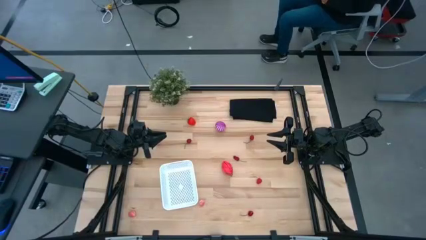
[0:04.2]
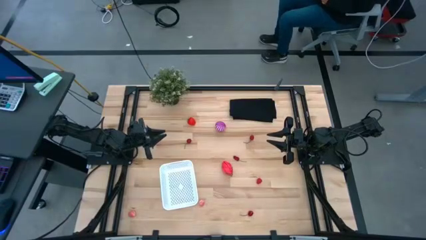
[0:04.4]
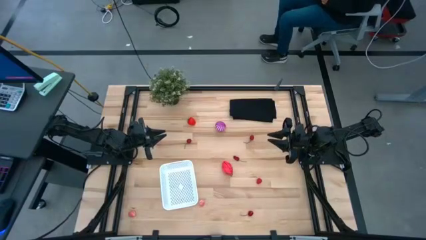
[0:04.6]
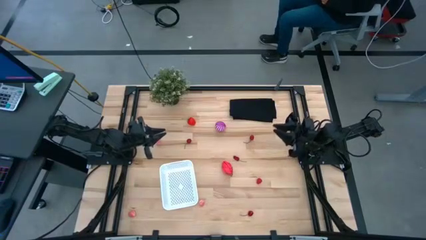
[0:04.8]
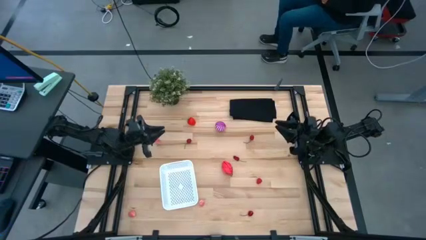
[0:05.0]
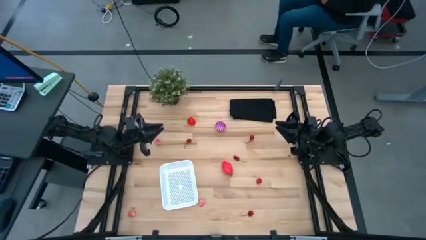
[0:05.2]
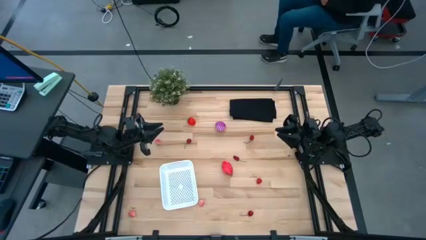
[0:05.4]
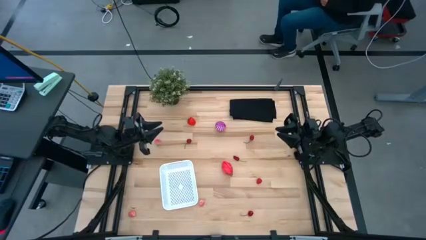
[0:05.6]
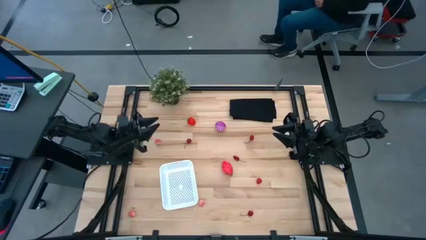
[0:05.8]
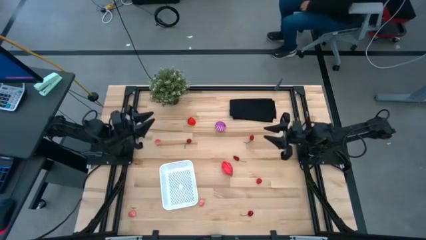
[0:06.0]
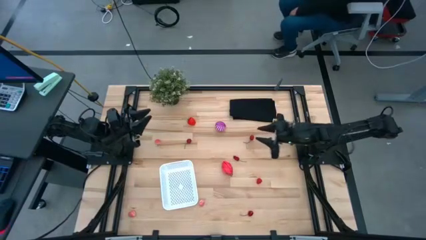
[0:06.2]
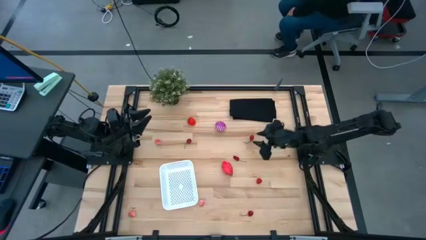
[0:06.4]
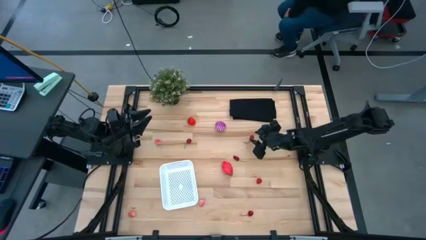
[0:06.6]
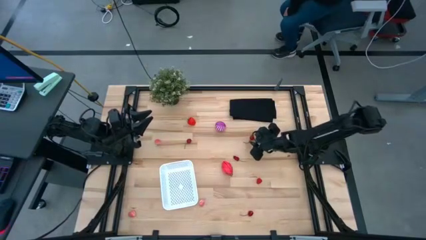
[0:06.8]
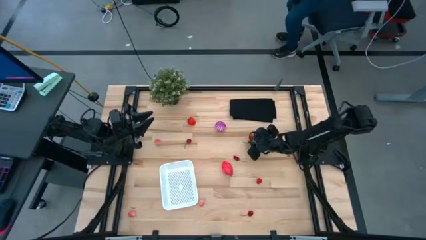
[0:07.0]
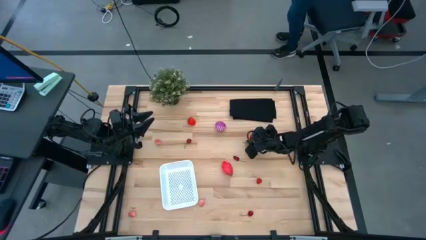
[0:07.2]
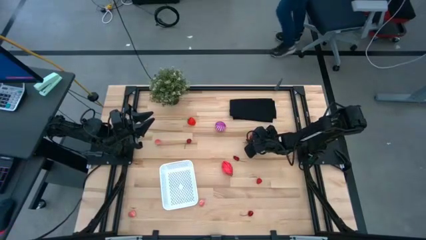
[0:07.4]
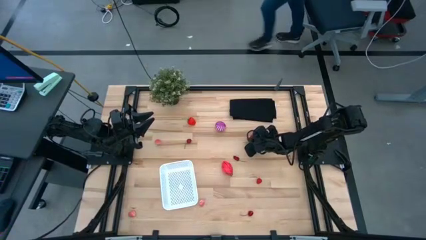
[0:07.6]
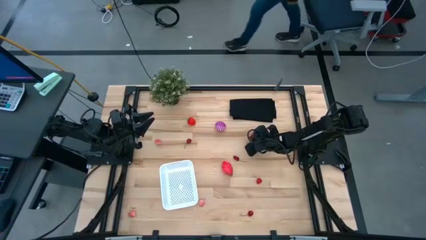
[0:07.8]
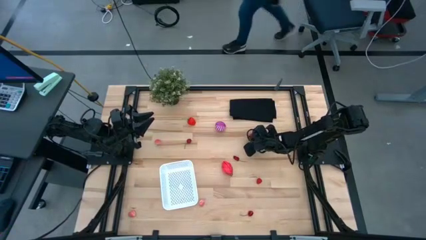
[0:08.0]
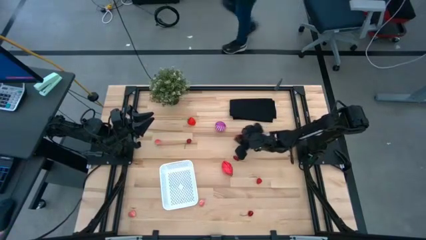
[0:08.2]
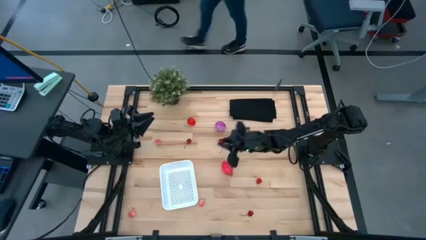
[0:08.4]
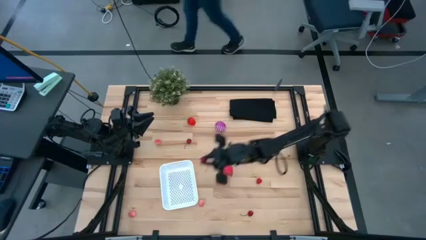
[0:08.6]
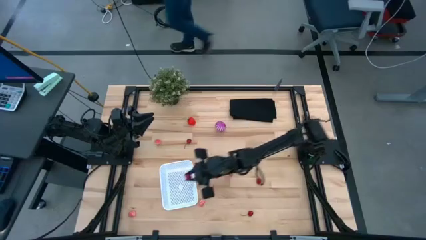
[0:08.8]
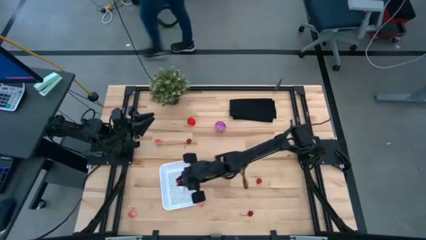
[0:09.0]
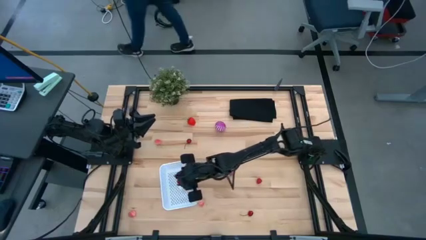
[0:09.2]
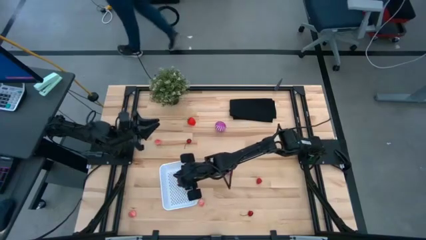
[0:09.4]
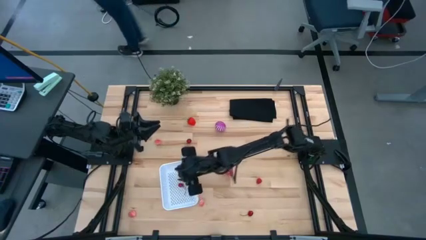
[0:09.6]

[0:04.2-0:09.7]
Task: Pick and placing Produce into tupperware
Put the top right cherry into the white bin

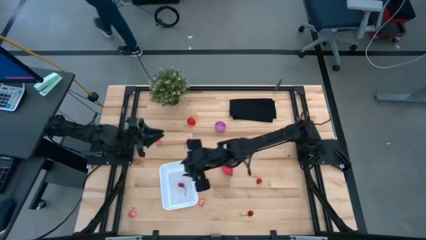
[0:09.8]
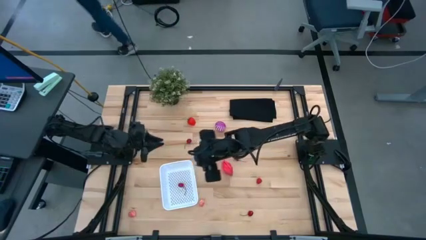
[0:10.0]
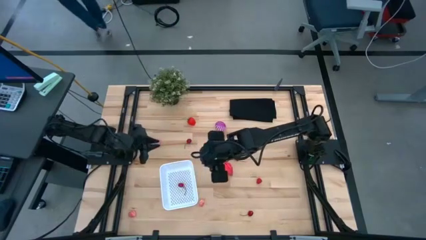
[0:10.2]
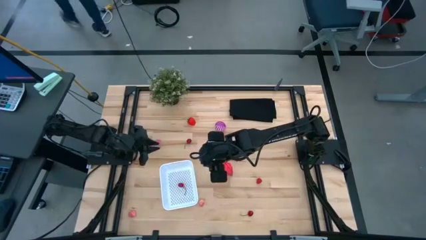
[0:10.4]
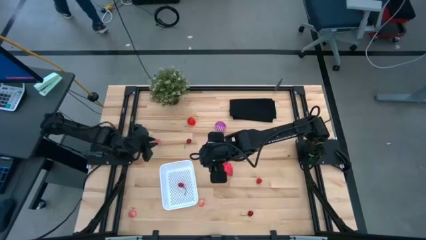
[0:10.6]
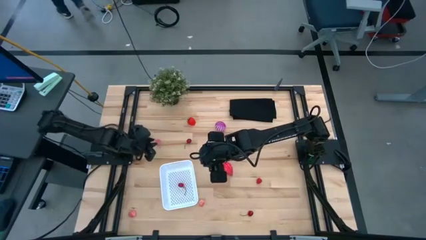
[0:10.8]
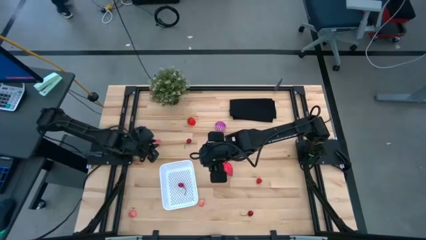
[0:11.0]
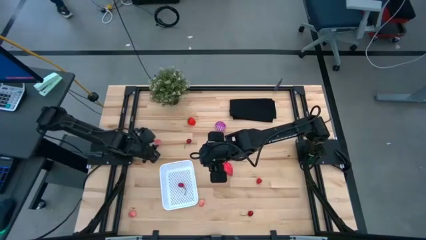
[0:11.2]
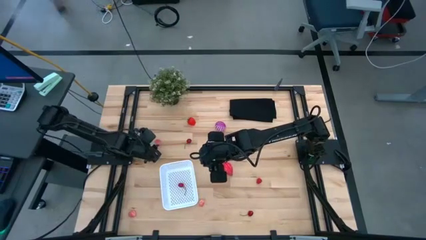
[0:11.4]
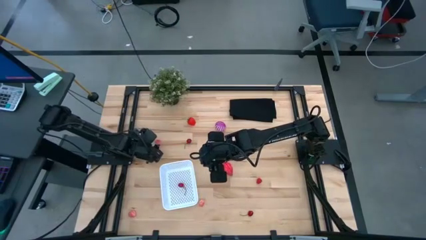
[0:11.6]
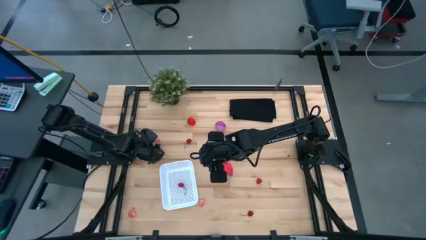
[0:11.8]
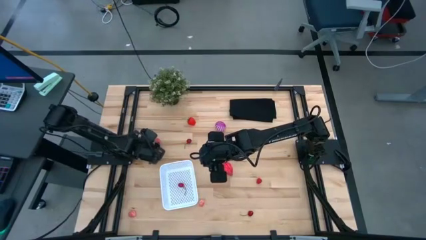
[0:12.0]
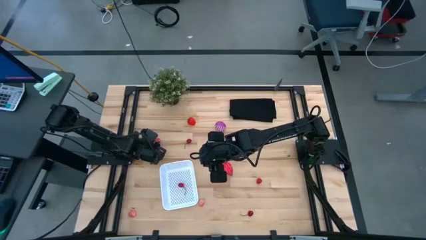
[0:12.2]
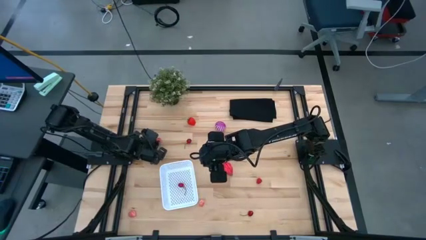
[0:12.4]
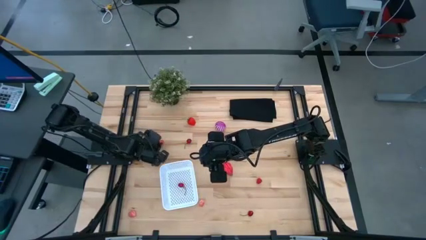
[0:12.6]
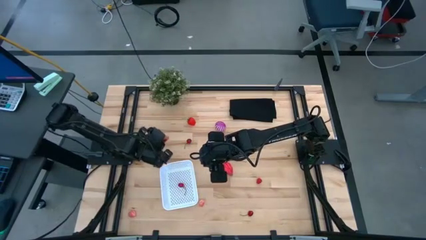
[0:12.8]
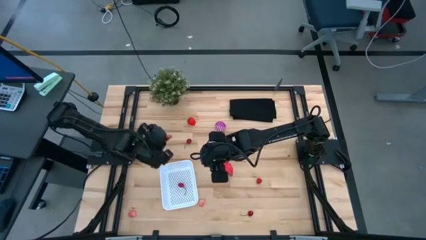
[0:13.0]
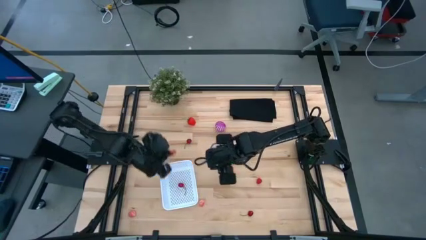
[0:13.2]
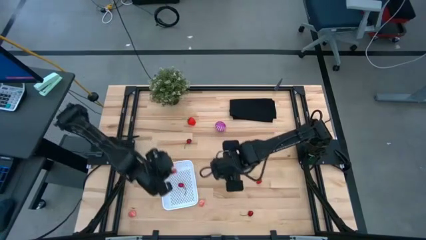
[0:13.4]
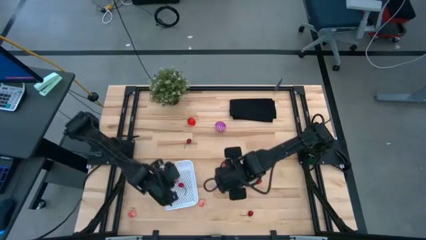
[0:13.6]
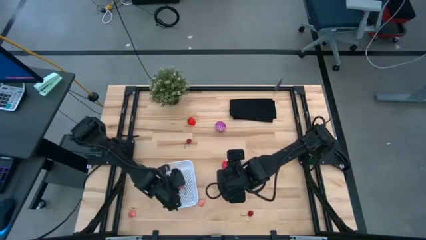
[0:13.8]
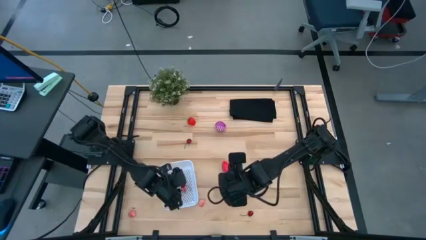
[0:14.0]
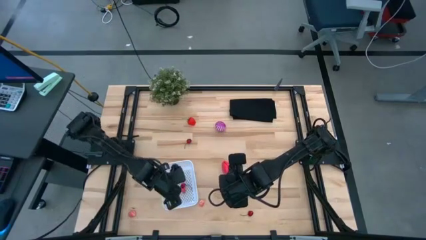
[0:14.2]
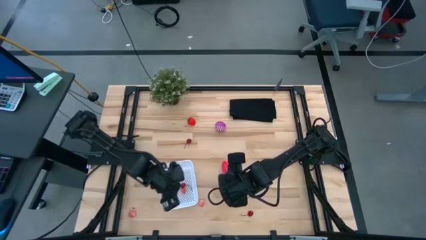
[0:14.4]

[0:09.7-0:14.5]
Put the top left lychee into the white bin

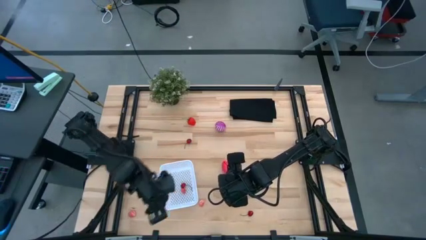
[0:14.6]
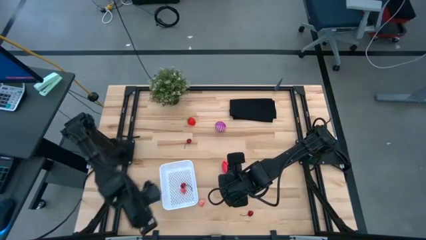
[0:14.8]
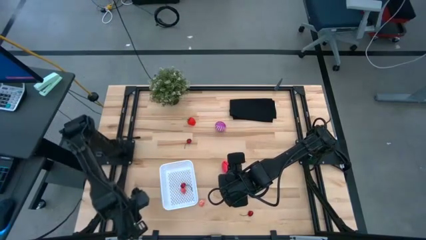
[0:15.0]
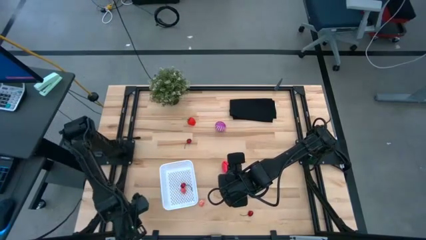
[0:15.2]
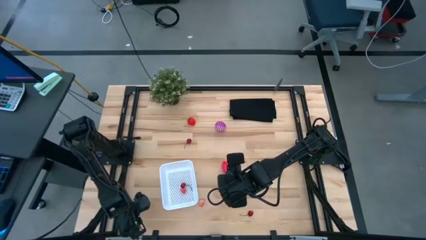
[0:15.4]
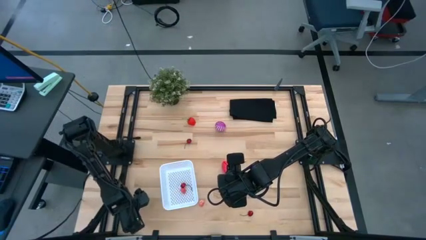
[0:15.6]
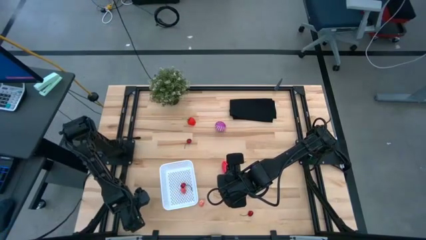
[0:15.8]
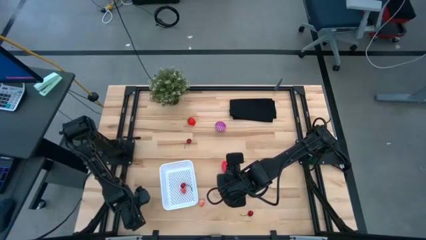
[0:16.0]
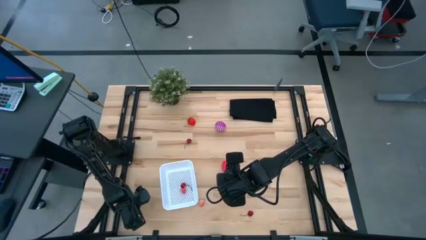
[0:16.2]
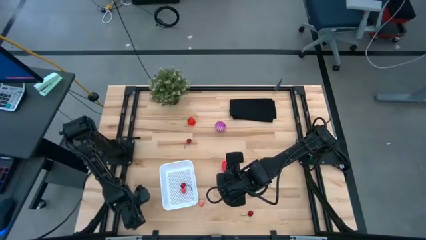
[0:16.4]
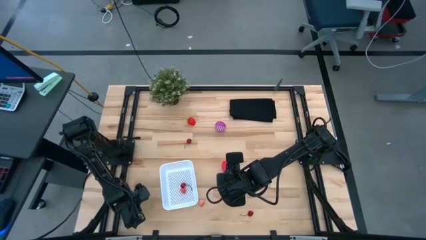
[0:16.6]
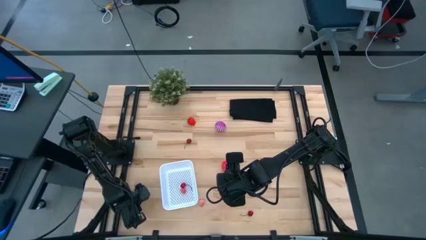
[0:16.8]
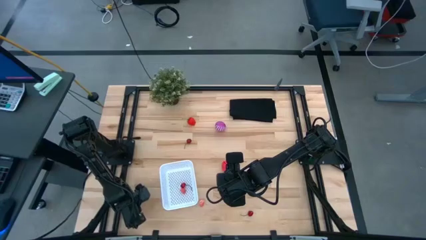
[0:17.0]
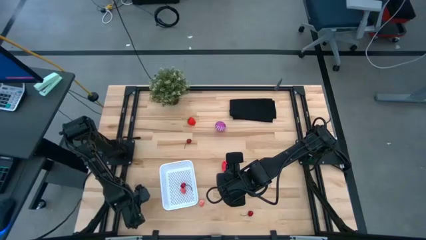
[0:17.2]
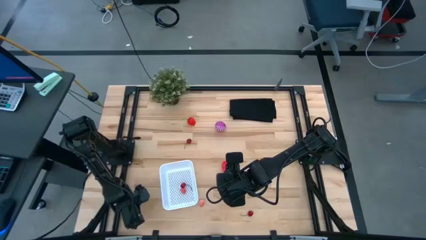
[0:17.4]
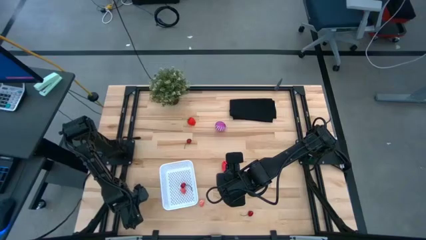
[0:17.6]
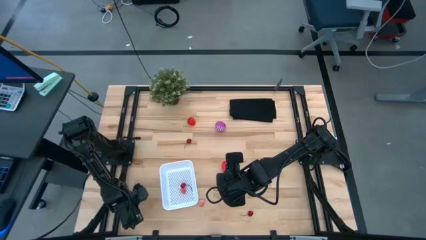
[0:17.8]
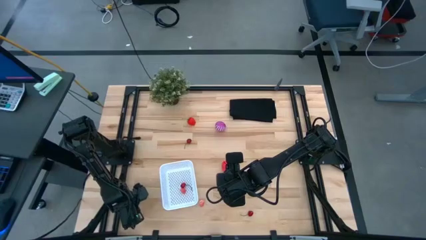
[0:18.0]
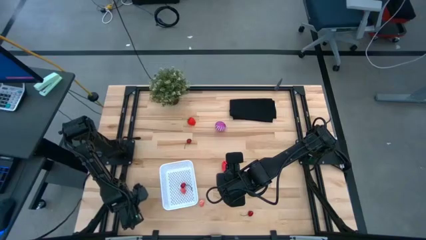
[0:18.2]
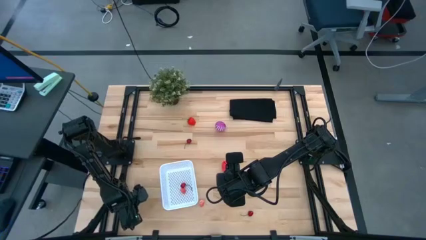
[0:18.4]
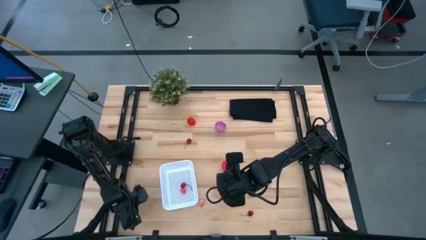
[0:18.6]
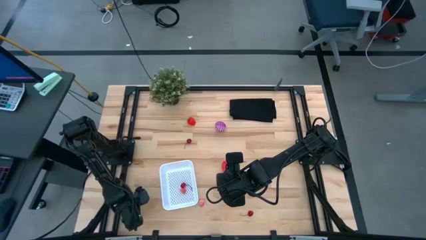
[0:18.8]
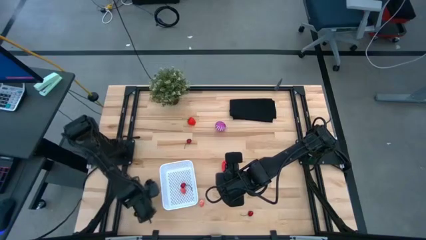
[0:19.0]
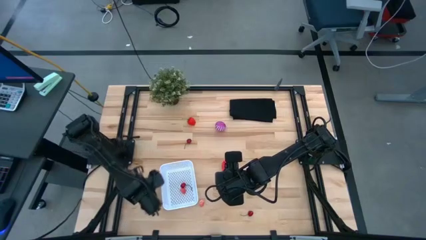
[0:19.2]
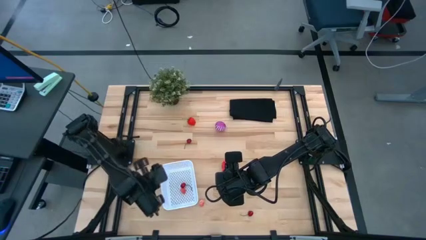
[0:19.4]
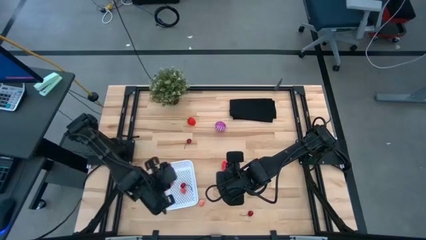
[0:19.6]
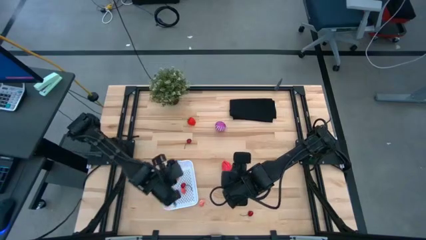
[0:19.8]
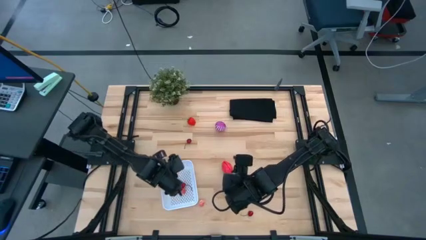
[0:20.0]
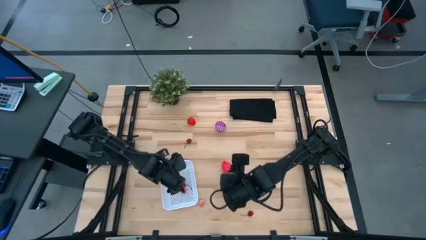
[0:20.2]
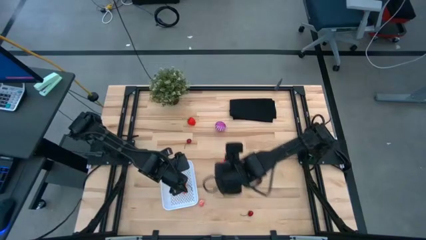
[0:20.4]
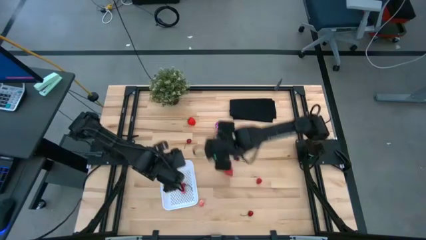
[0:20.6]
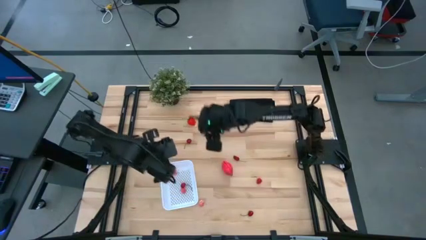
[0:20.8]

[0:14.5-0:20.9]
Put the left lychee into the white bin
